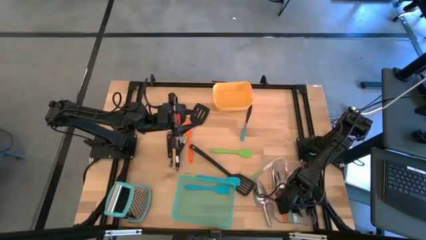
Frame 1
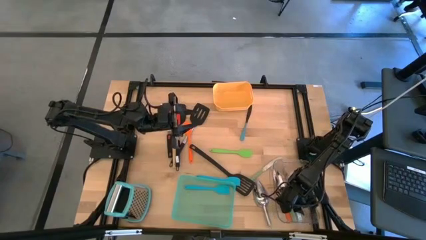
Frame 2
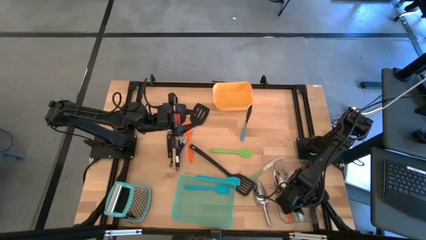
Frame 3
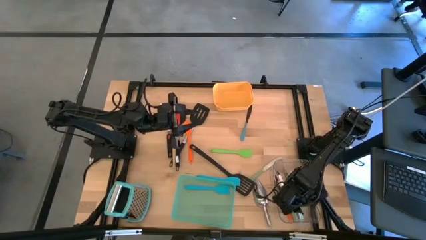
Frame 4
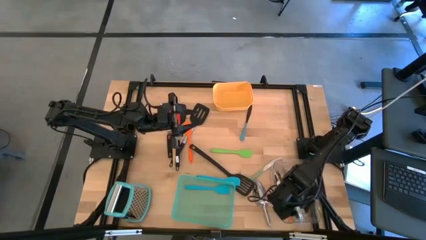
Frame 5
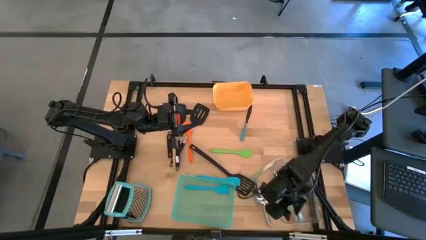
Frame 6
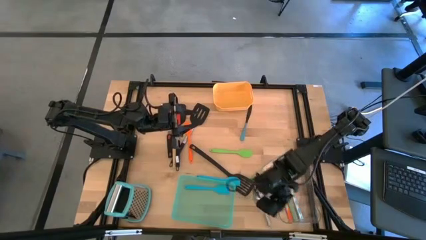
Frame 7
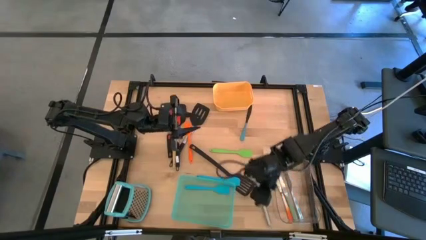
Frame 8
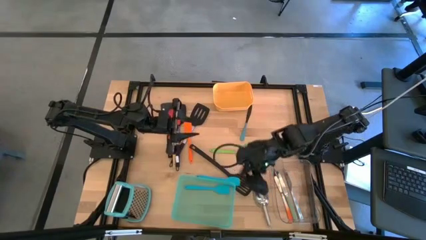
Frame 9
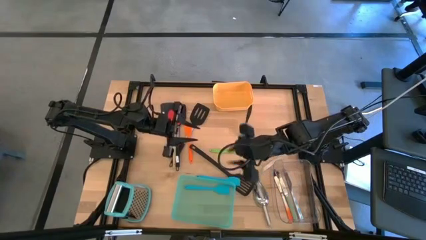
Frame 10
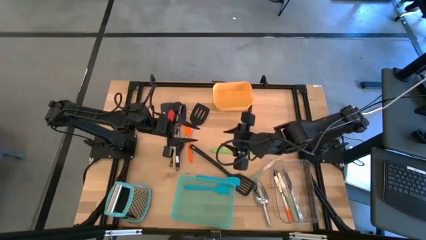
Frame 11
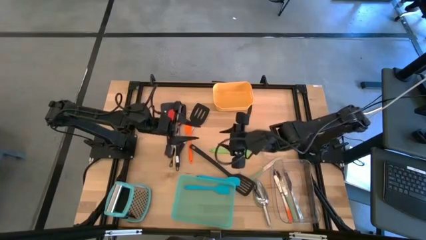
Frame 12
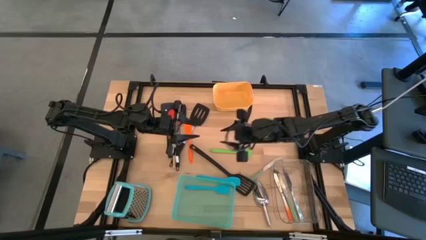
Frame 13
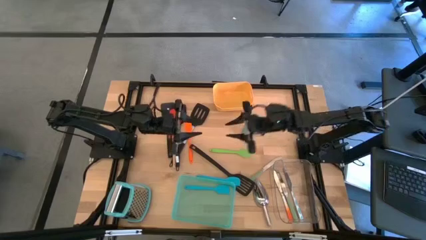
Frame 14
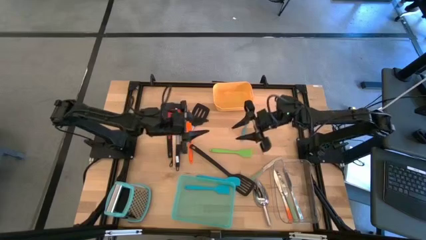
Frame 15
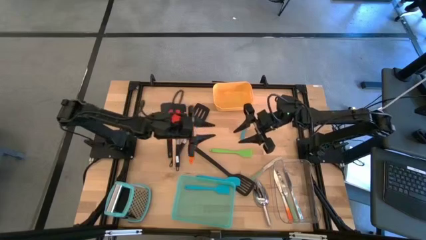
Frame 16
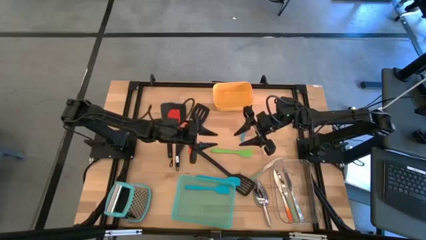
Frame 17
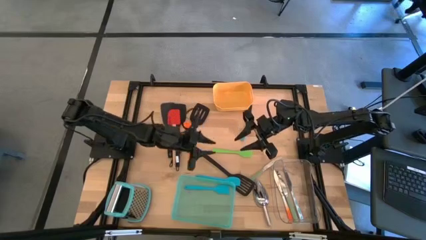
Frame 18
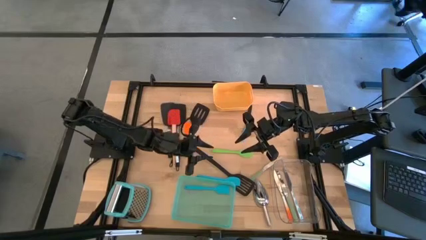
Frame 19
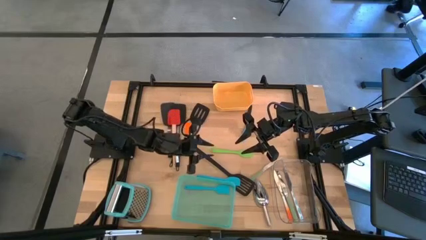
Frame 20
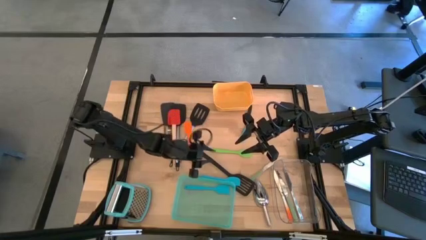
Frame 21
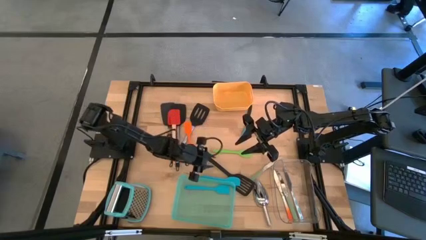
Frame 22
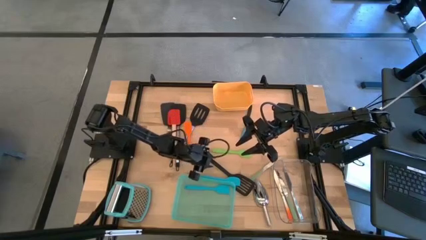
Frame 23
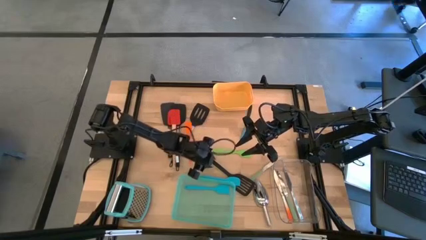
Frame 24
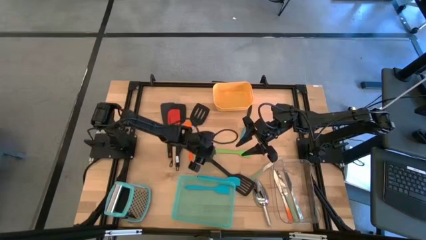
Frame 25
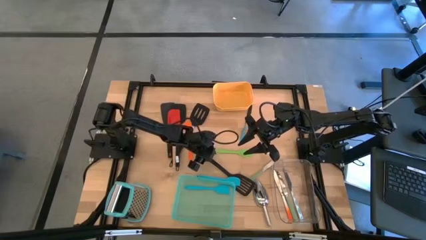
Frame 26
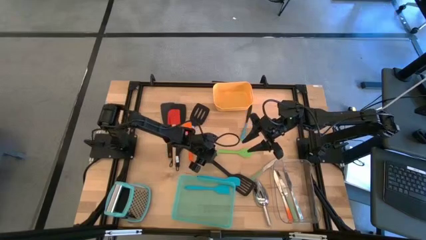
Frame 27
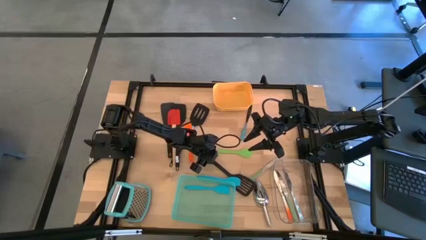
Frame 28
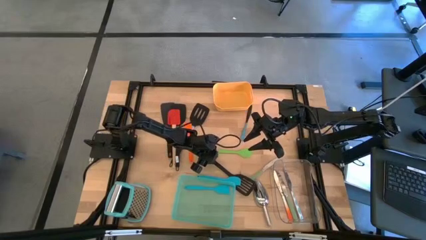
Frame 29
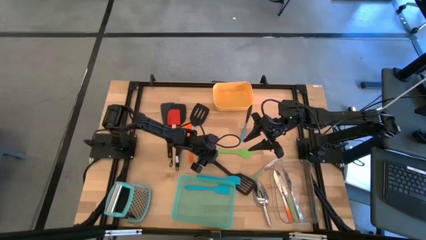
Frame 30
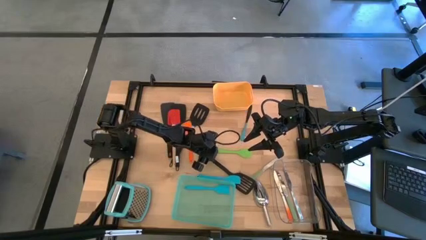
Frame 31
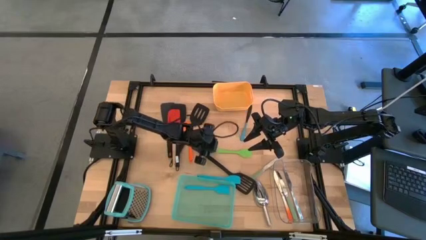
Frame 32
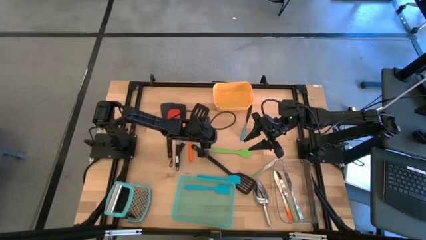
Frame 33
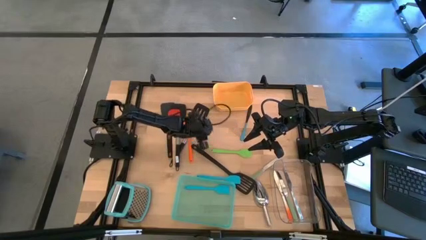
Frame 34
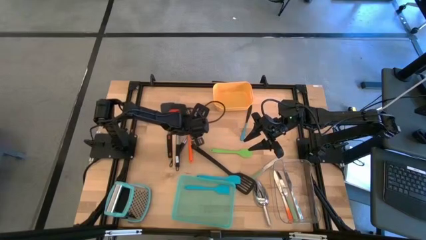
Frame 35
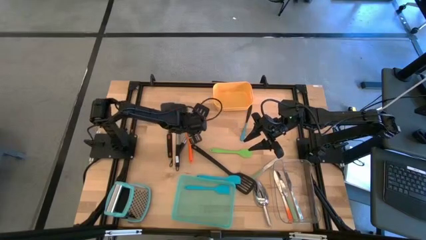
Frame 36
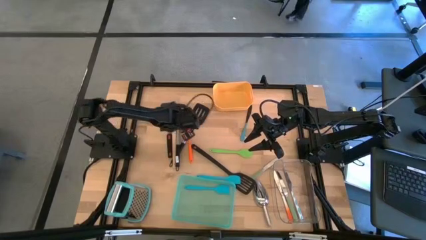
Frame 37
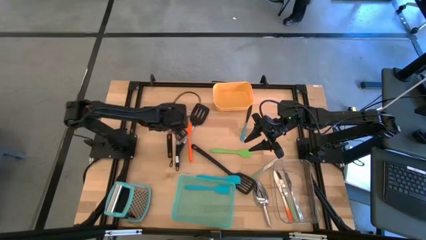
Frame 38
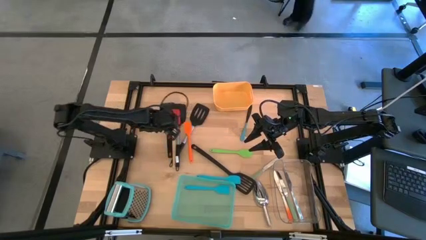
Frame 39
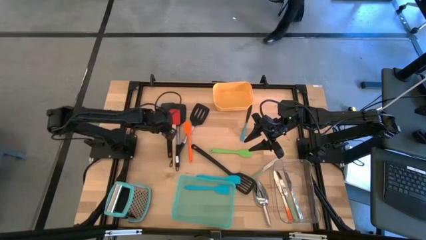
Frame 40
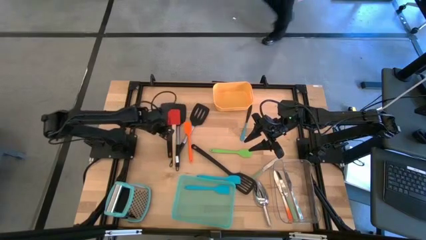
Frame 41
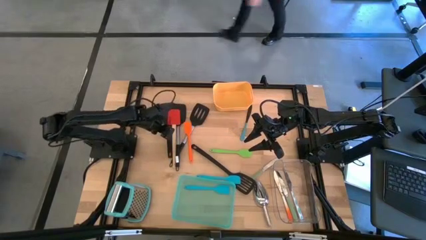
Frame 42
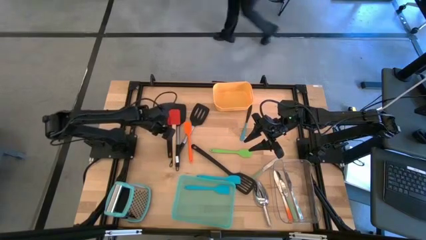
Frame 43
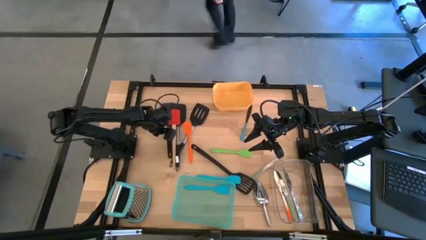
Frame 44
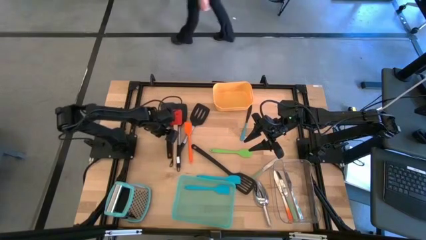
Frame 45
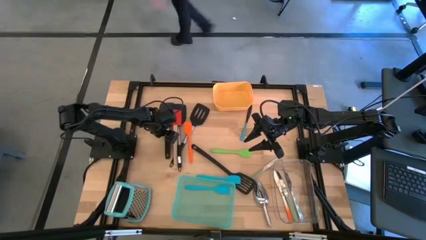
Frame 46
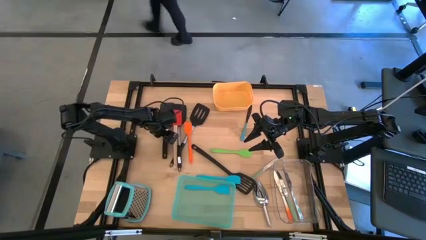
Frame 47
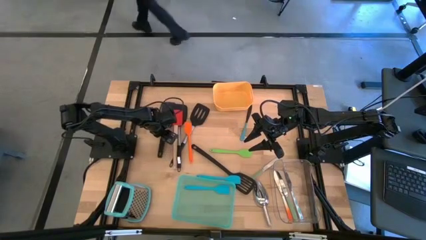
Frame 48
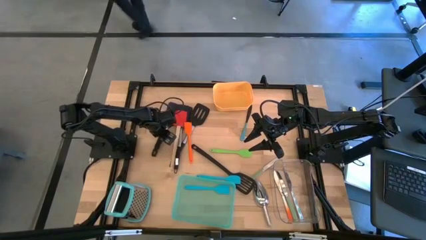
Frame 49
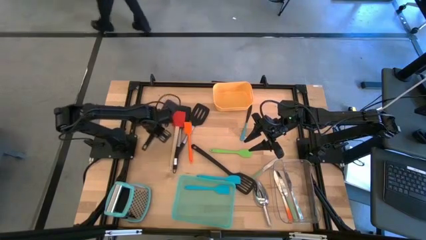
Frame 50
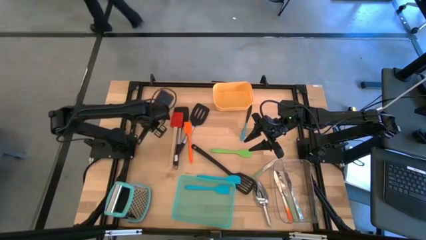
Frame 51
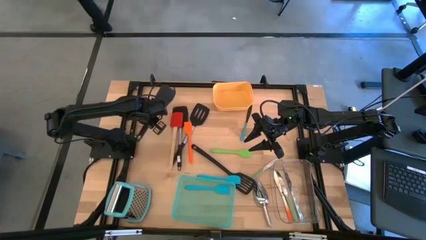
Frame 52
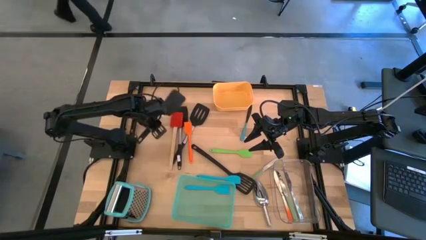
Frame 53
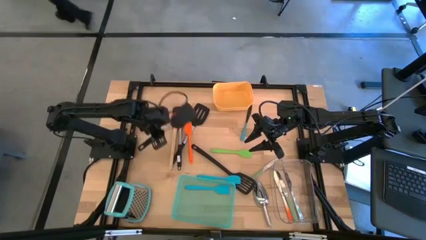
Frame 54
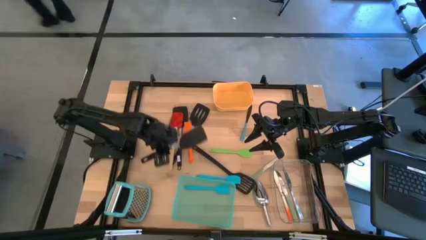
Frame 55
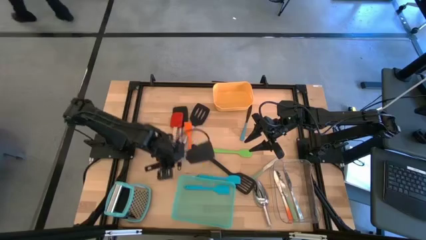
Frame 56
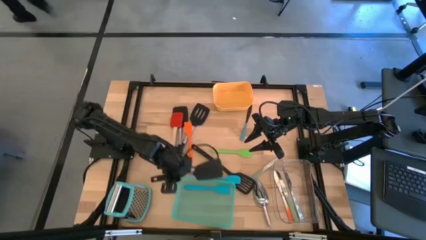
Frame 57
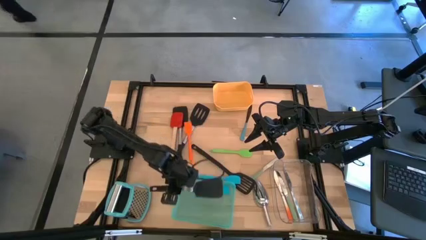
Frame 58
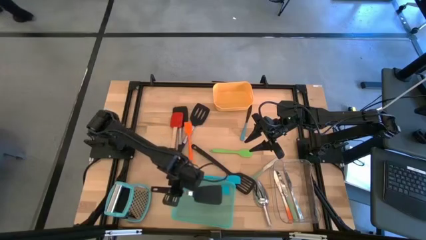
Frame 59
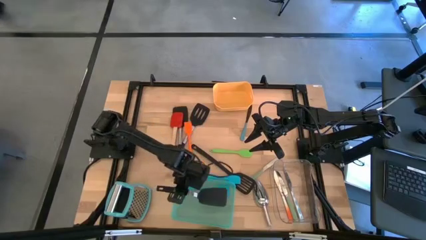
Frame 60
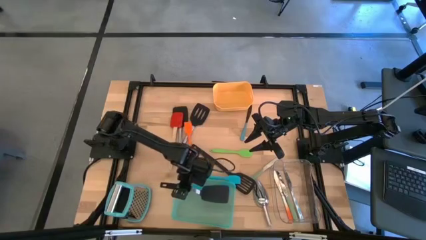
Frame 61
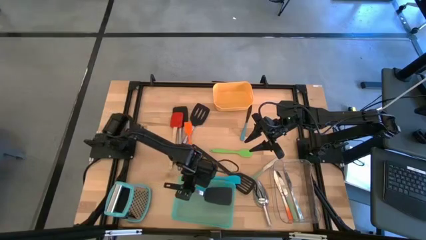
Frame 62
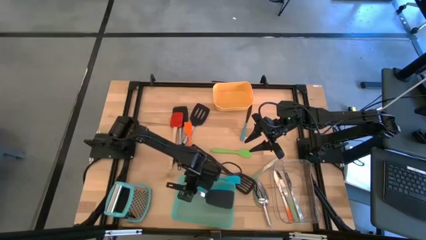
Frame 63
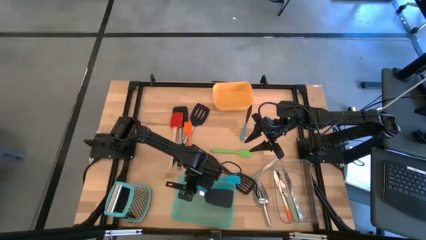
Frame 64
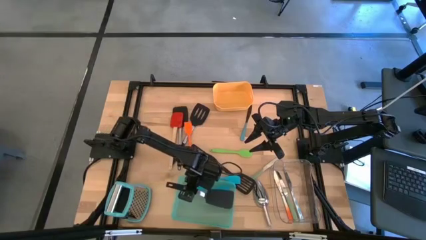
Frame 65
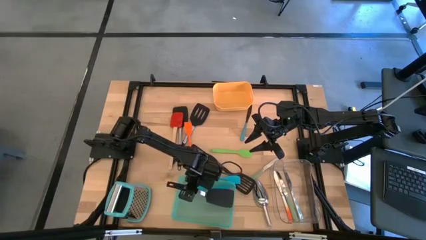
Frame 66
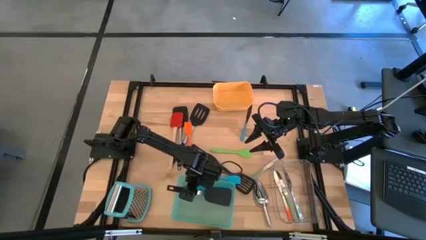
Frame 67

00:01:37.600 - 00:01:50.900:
Task: Pick & Place Kitchen Items
Put the black spatula into the blue bin
